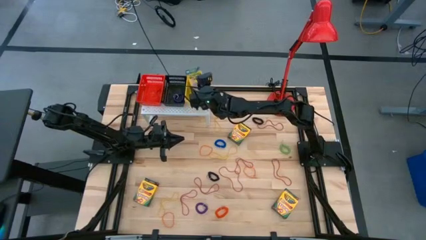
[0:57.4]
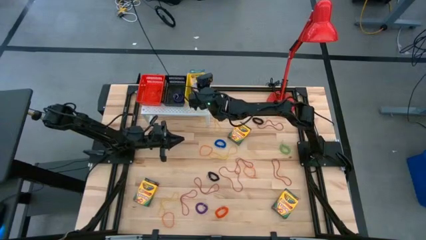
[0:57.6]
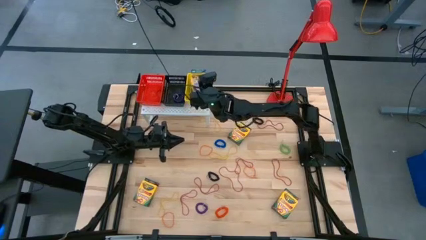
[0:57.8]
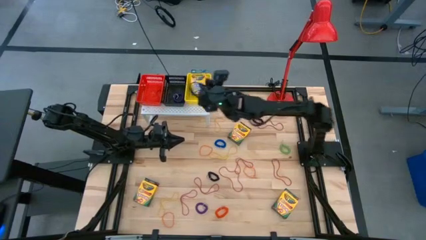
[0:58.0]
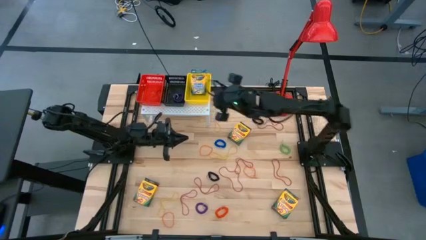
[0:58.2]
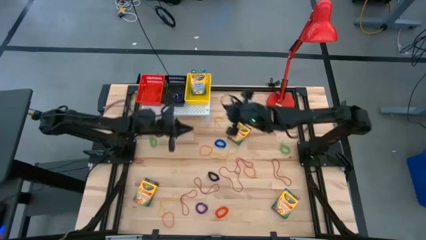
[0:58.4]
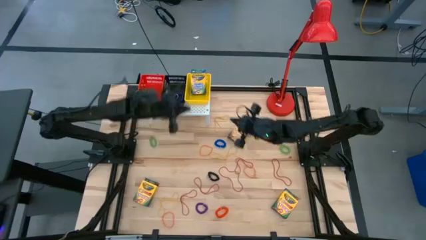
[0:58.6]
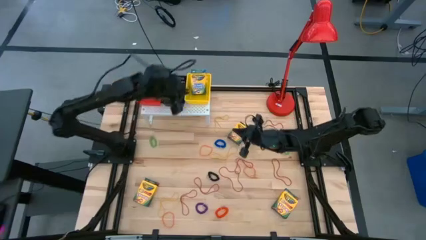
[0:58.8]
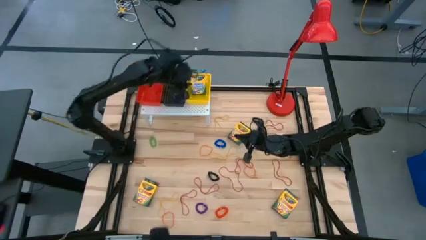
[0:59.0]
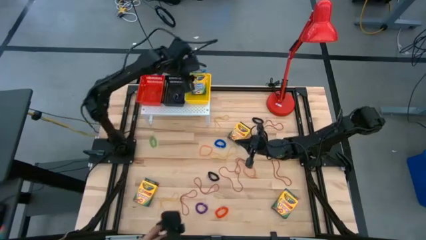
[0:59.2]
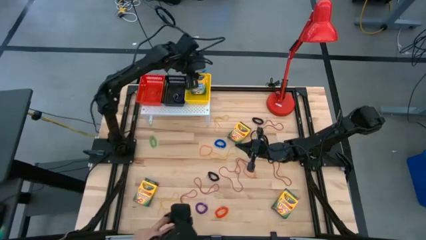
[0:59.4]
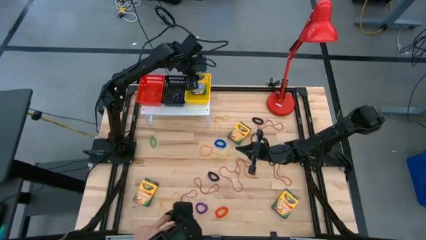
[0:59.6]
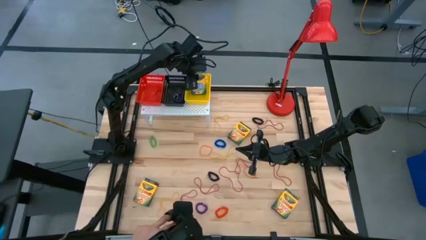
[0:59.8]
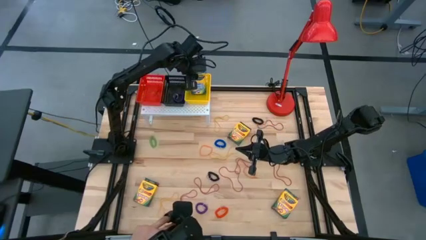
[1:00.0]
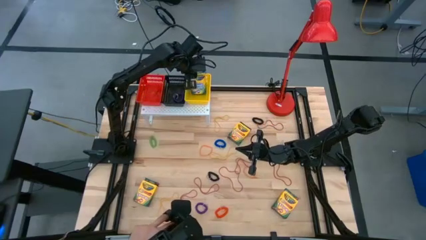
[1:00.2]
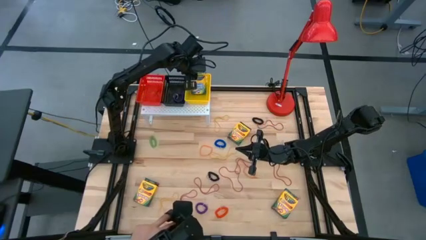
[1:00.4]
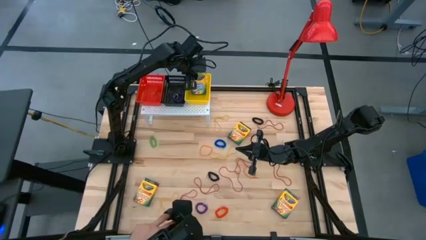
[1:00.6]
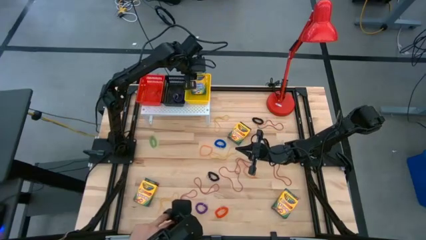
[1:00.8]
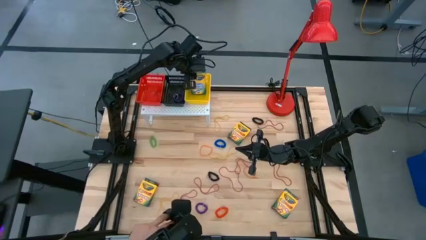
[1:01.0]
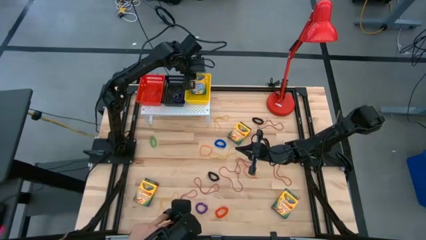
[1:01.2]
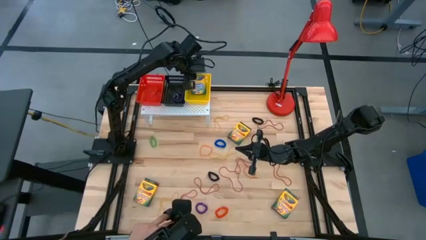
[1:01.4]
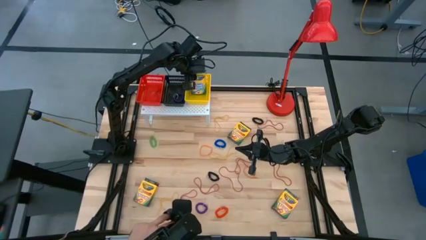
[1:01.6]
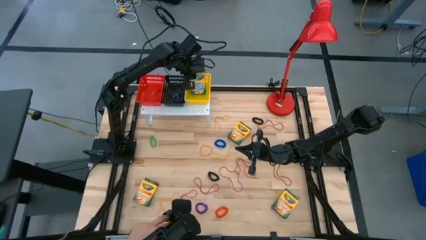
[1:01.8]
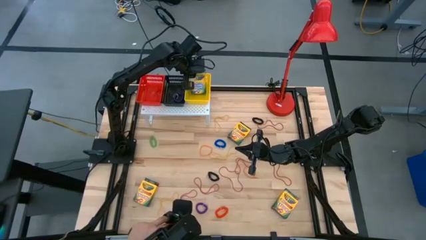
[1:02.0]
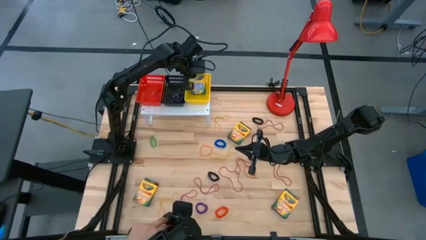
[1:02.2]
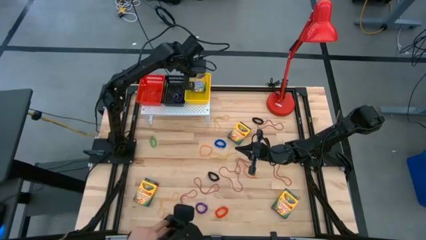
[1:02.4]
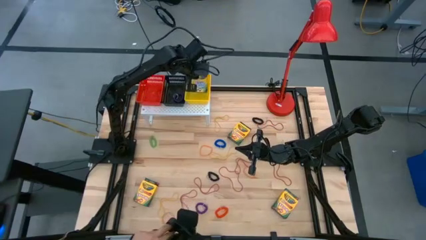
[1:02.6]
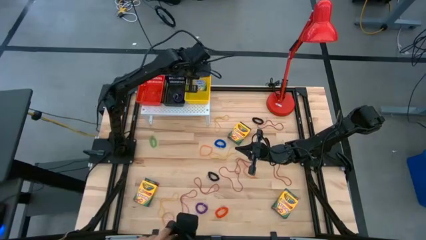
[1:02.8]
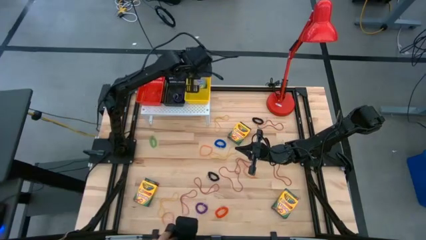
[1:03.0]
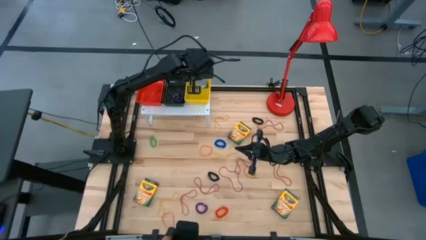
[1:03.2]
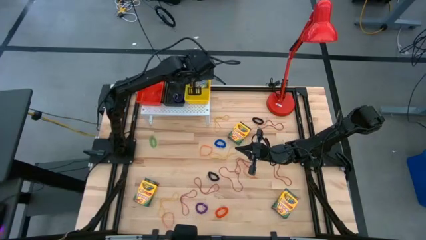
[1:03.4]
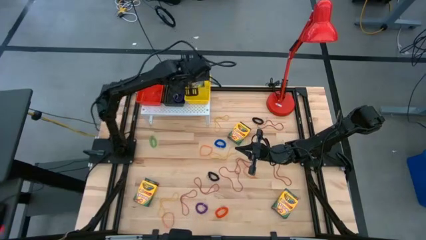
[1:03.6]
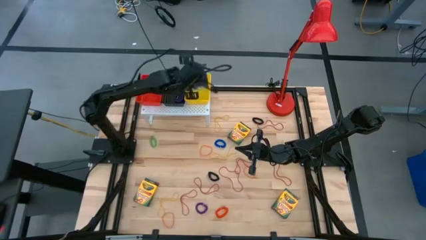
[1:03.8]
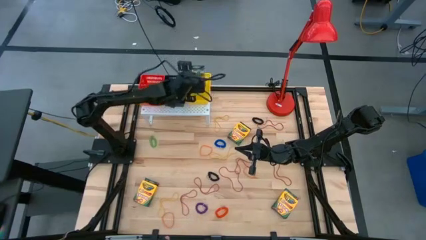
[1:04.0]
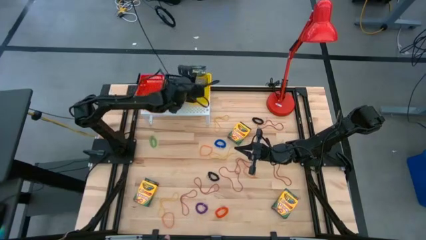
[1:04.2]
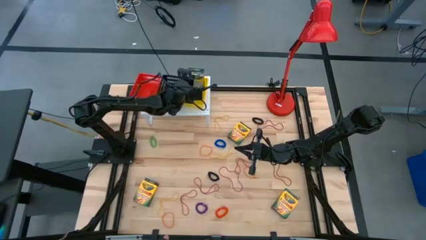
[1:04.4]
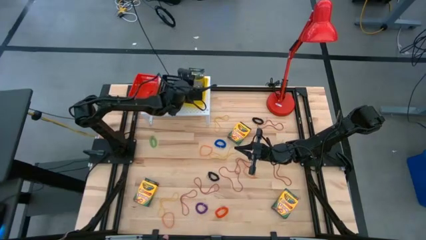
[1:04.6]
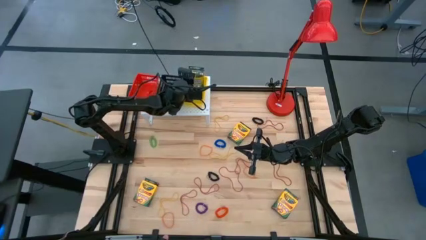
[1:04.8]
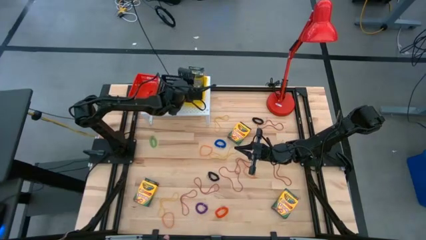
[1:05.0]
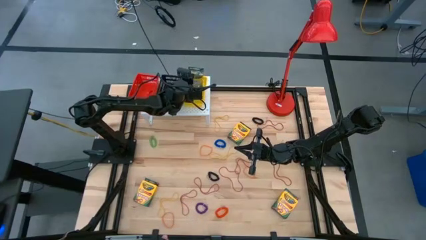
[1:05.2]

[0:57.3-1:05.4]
Task: Pick & Place Office Desk Supplies
Adjust the crayon box in the yellow bin

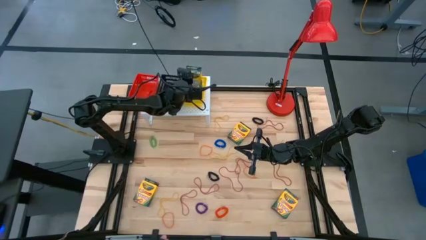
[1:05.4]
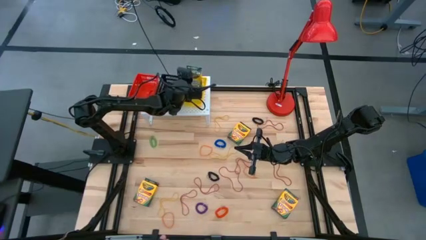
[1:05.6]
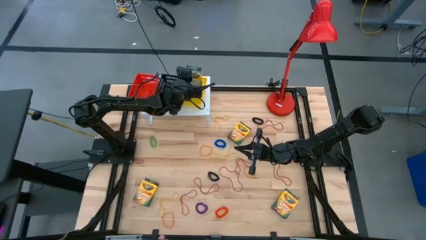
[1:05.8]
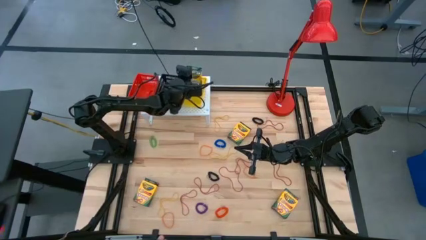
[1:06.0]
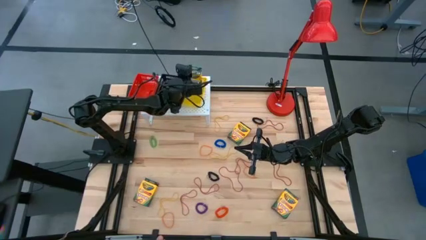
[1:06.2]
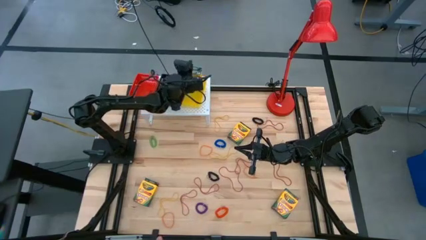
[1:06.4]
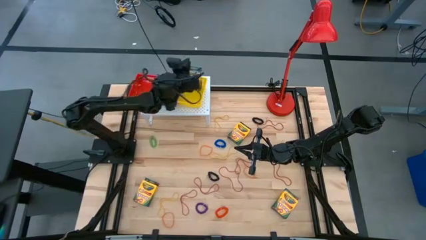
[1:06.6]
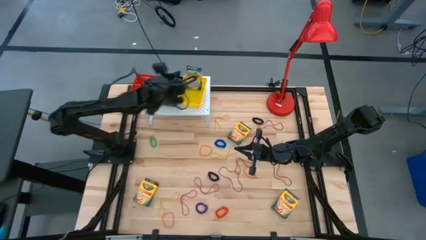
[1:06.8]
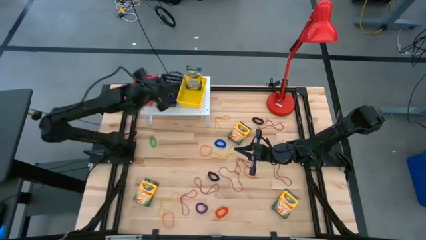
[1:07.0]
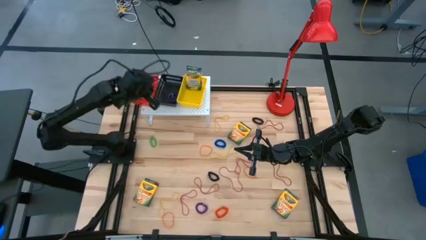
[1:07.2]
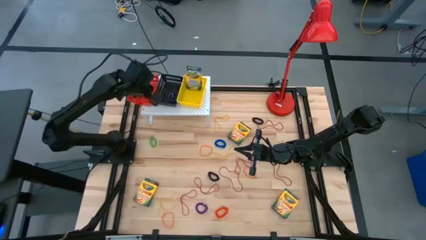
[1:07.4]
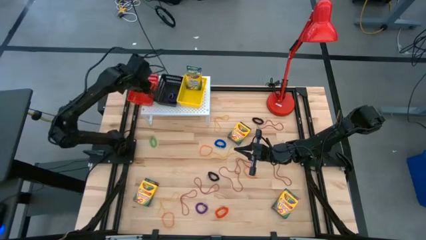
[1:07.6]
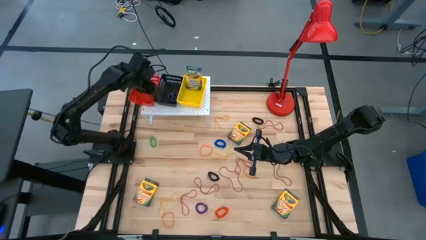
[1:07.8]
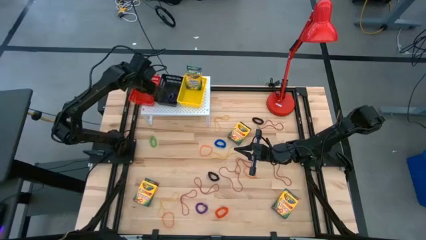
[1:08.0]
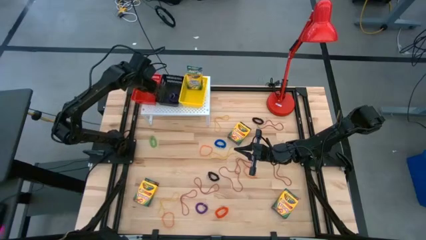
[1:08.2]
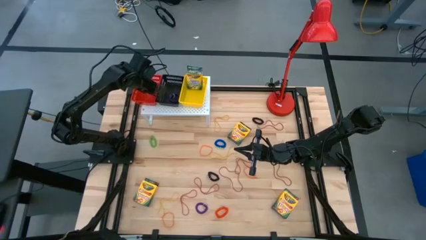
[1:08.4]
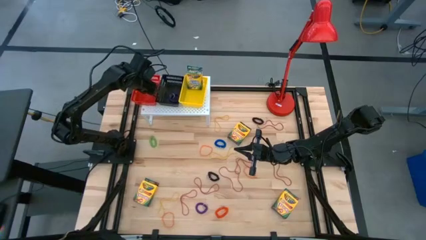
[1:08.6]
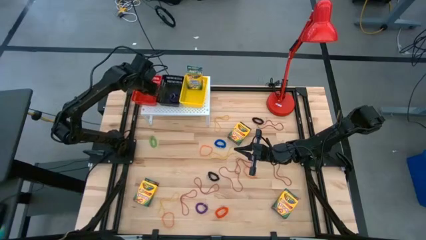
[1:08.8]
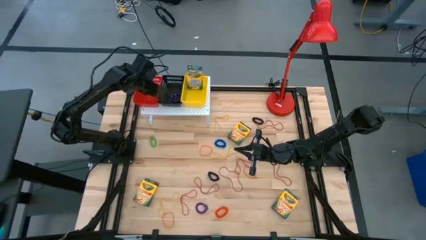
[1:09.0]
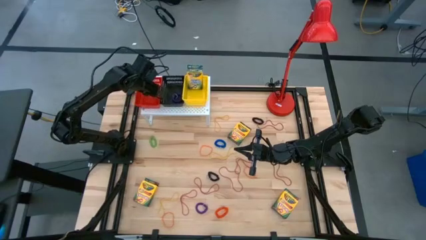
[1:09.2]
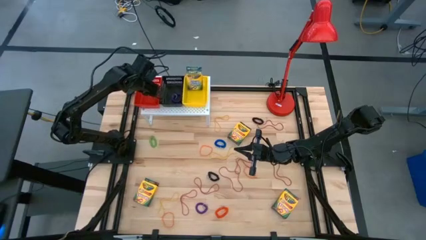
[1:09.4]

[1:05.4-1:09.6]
Adjust the red bin on the shelf

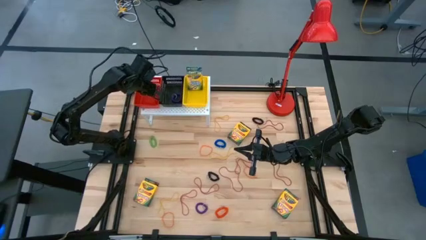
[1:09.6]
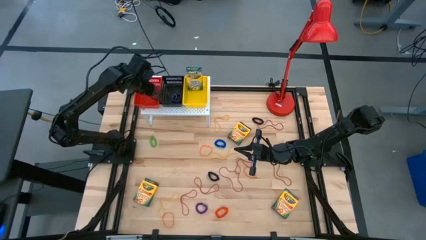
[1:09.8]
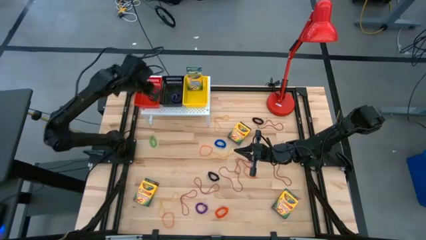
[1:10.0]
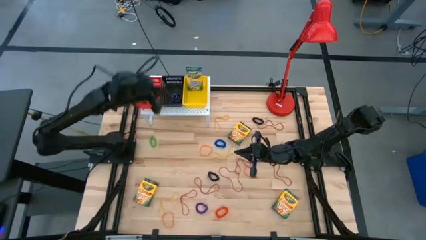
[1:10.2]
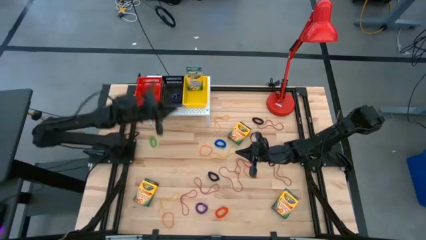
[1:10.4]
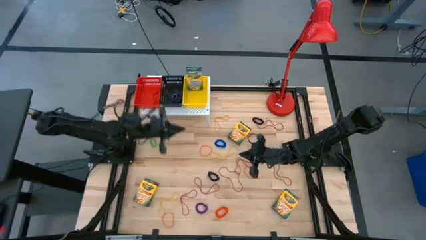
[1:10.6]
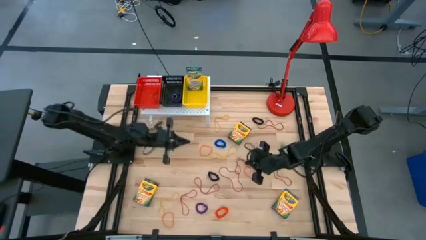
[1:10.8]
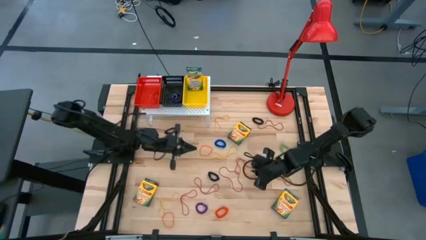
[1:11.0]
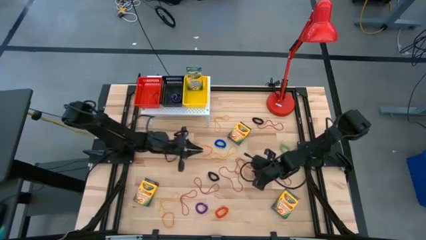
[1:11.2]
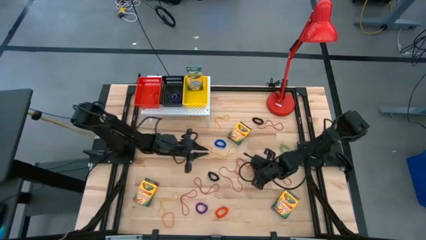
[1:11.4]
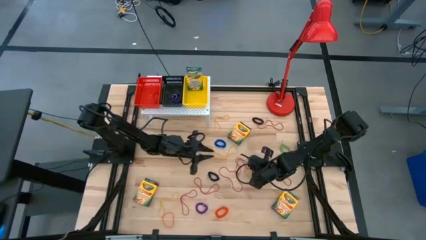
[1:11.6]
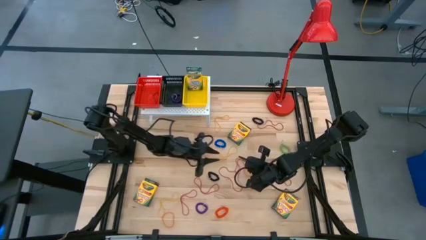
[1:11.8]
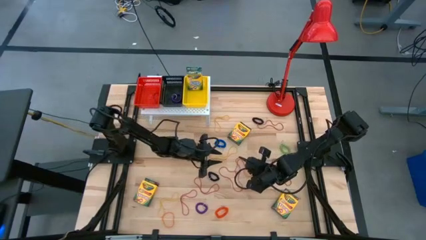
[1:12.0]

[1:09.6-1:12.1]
Put the orange rubber band into the red bin on the shelf

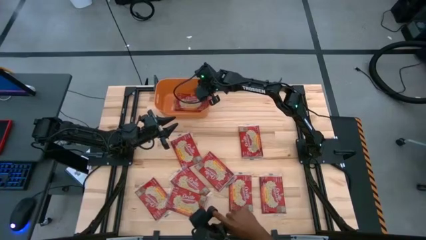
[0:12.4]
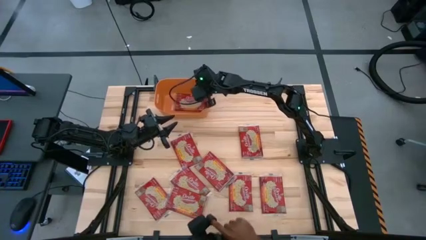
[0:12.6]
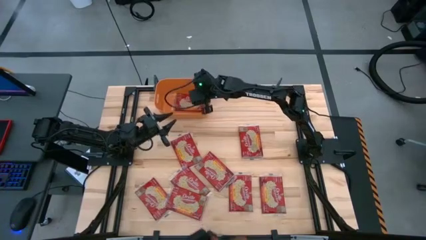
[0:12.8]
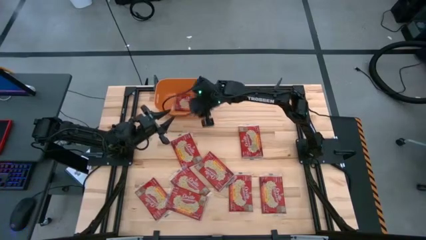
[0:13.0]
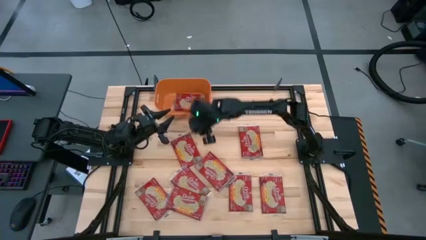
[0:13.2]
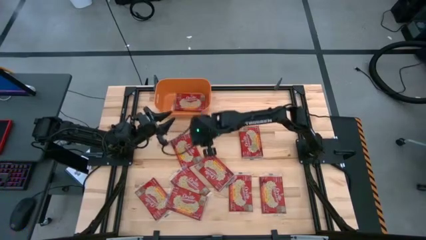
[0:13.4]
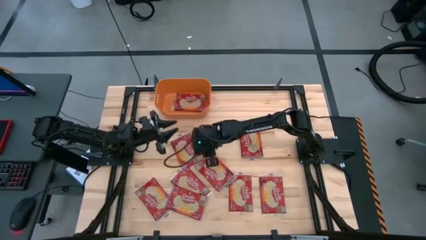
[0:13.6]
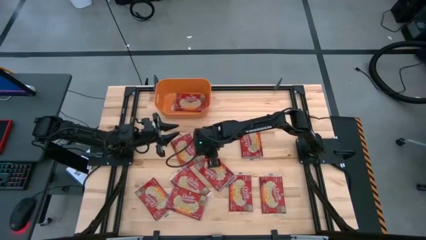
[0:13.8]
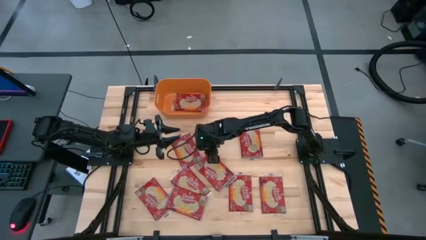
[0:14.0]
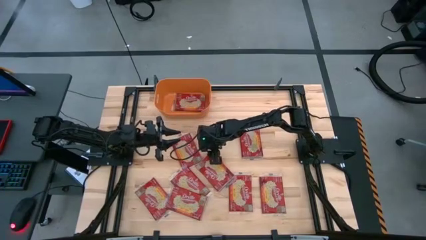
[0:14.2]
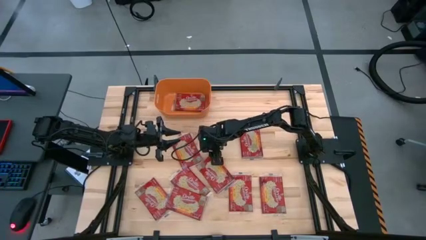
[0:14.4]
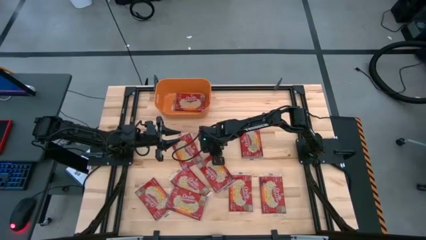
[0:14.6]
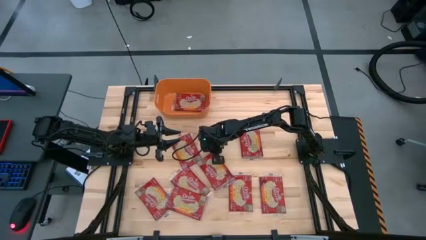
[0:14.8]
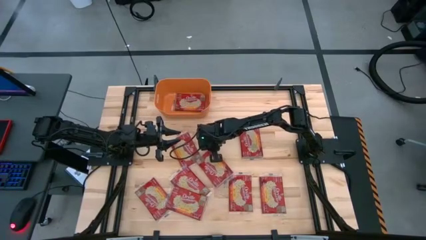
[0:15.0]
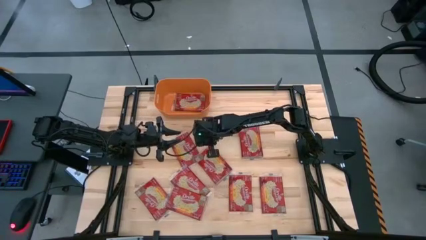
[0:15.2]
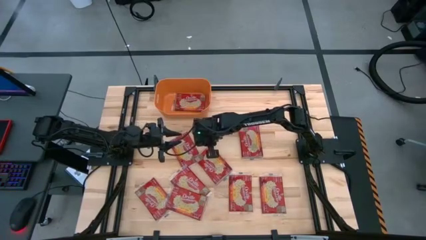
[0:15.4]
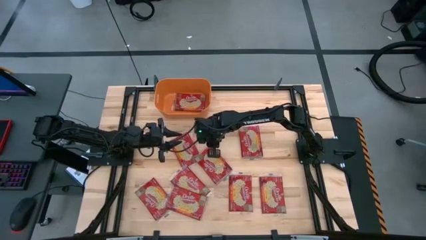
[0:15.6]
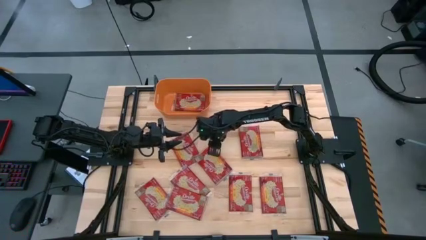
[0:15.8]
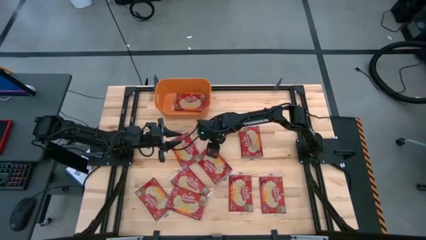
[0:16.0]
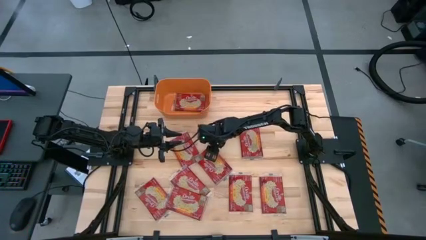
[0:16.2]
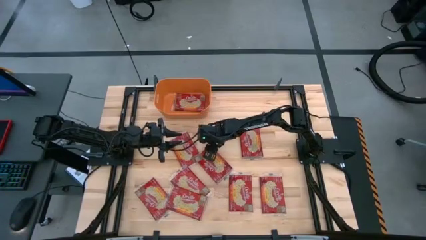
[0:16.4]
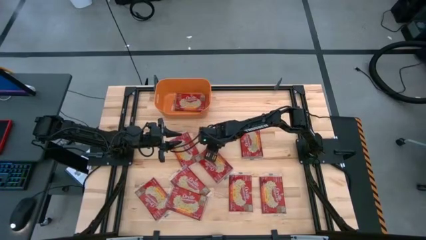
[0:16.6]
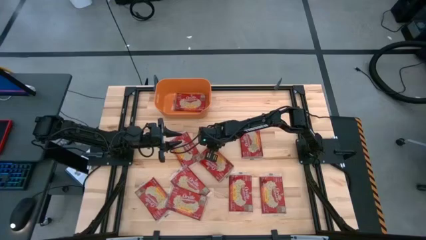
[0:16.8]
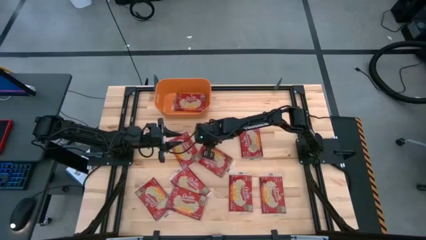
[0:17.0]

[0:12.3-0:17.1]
Task: Sort popcorn bags into baskets
Put the popcorn bag into the orange bin
